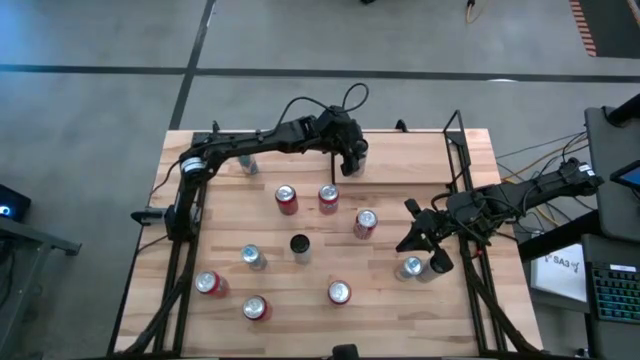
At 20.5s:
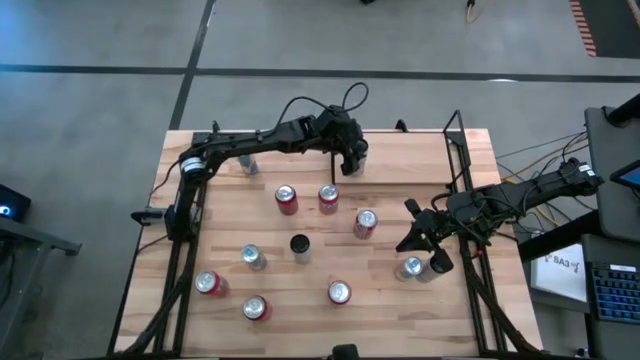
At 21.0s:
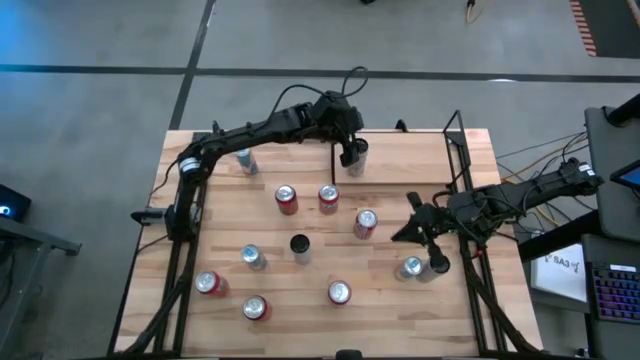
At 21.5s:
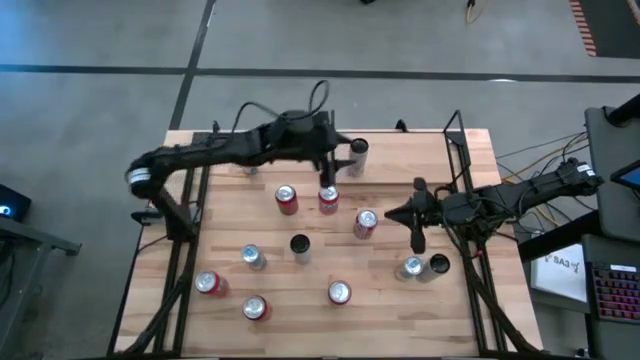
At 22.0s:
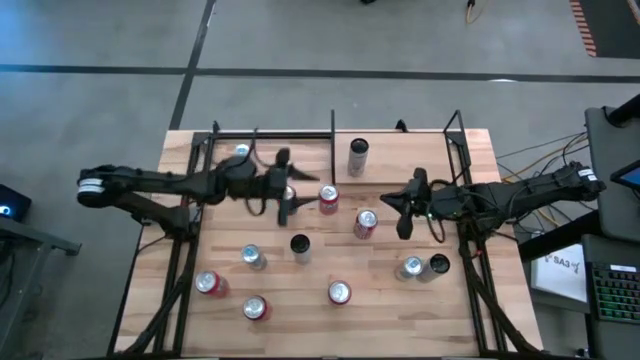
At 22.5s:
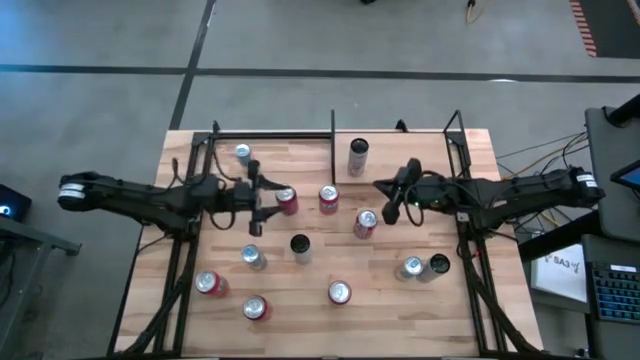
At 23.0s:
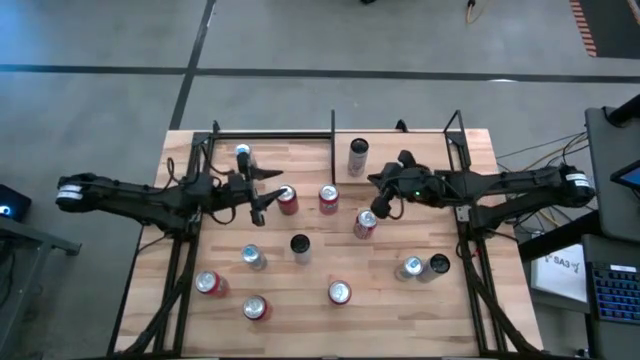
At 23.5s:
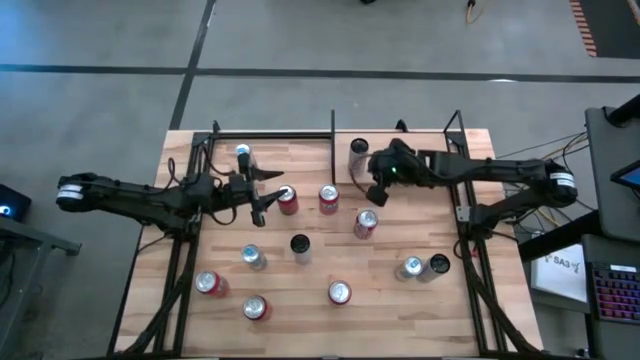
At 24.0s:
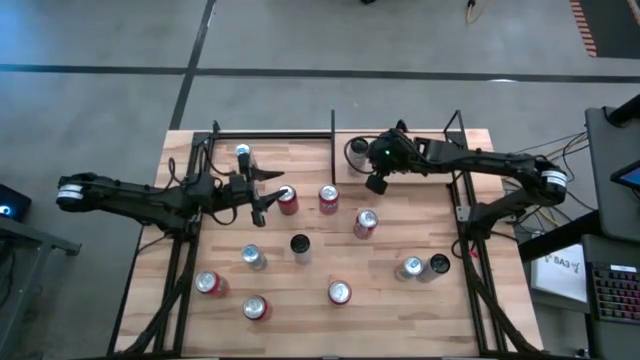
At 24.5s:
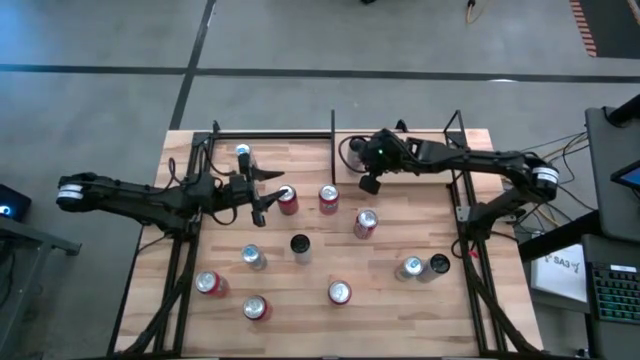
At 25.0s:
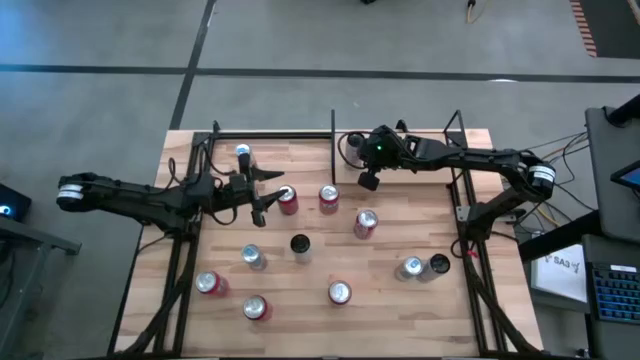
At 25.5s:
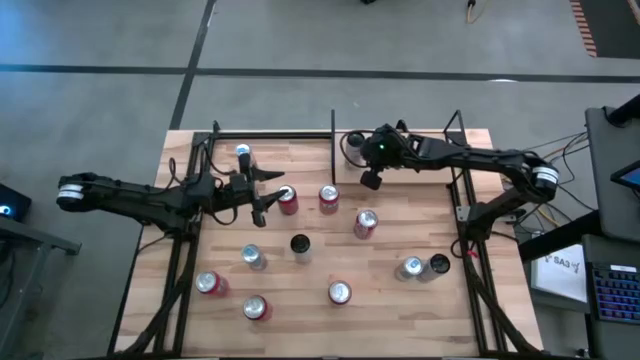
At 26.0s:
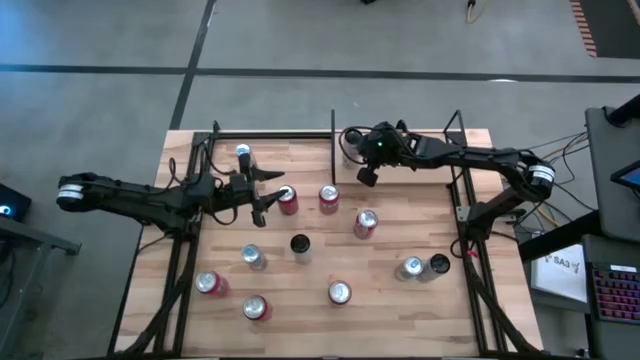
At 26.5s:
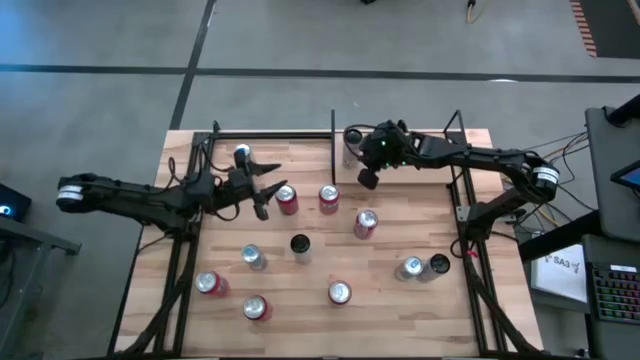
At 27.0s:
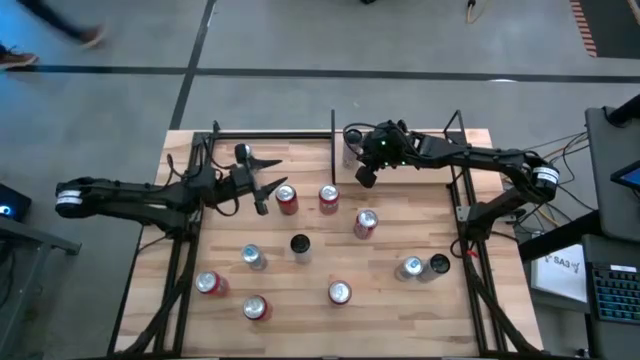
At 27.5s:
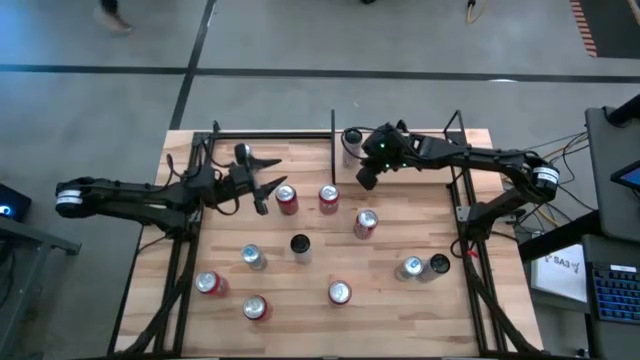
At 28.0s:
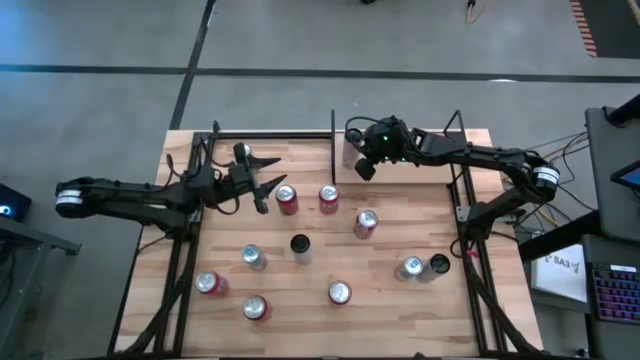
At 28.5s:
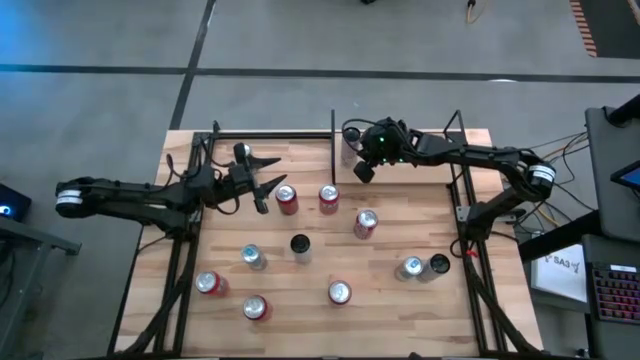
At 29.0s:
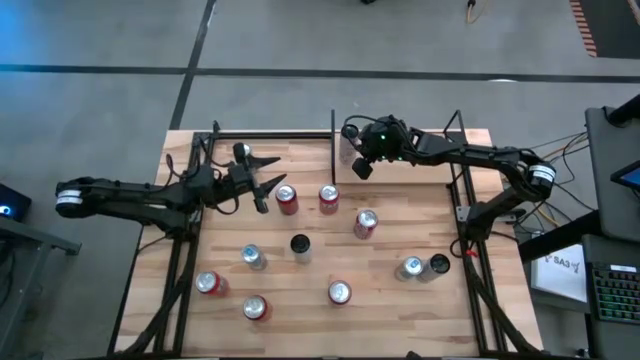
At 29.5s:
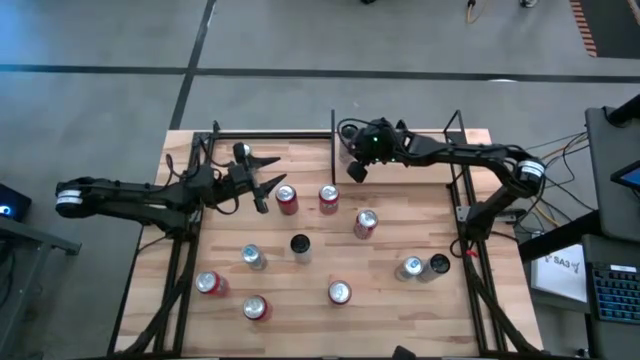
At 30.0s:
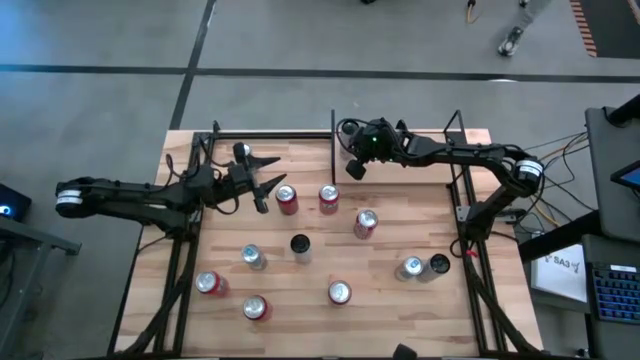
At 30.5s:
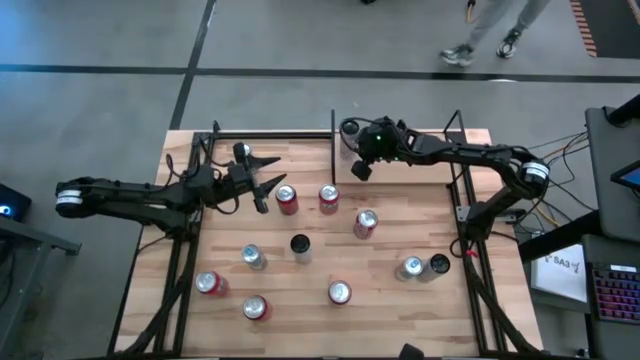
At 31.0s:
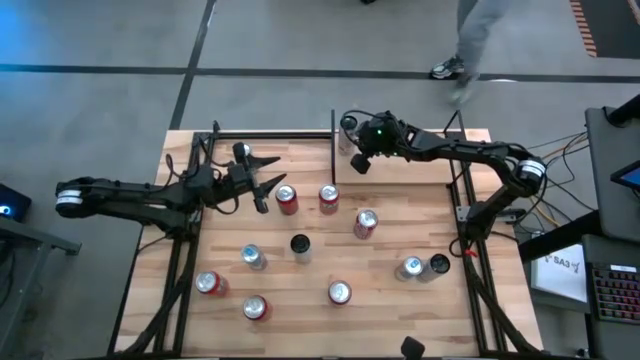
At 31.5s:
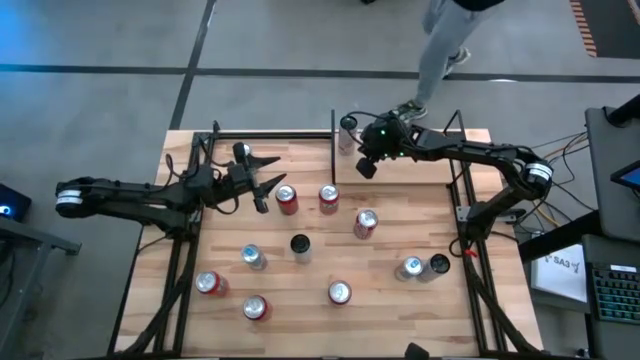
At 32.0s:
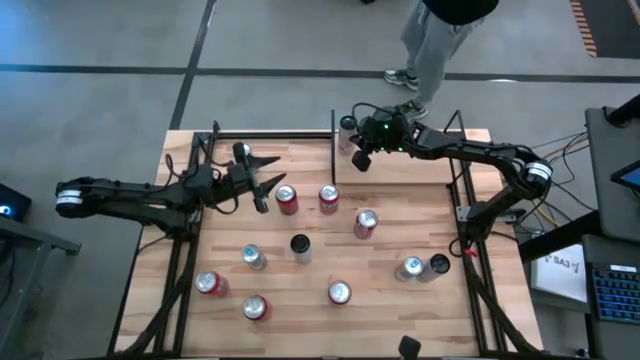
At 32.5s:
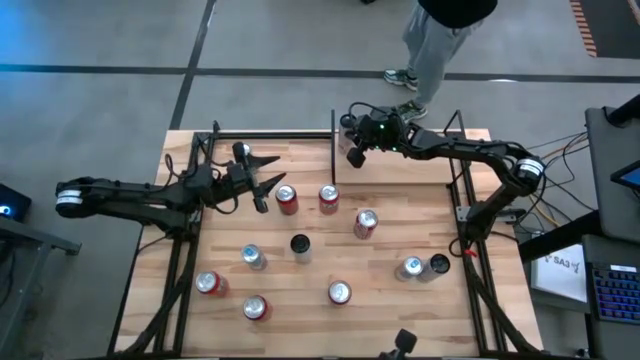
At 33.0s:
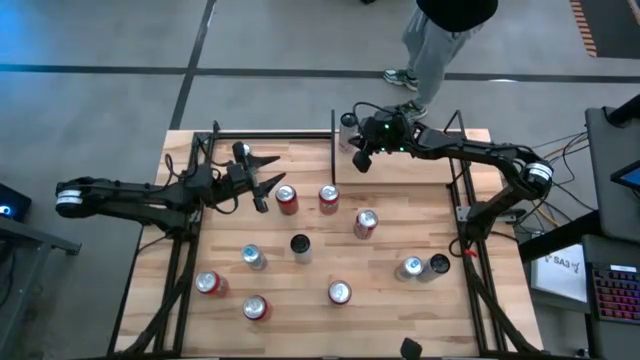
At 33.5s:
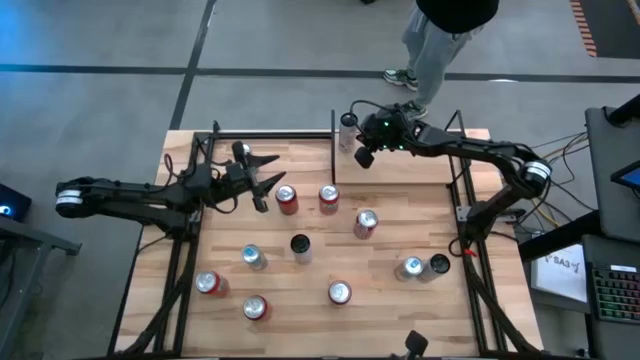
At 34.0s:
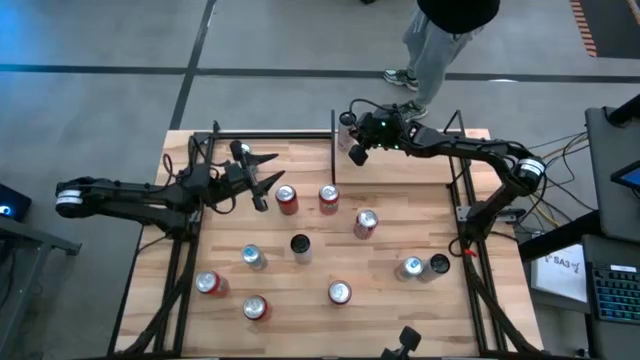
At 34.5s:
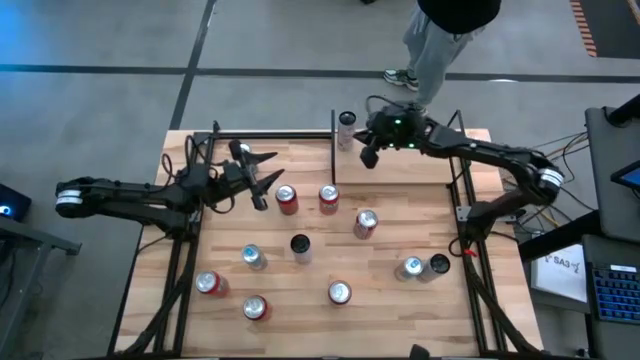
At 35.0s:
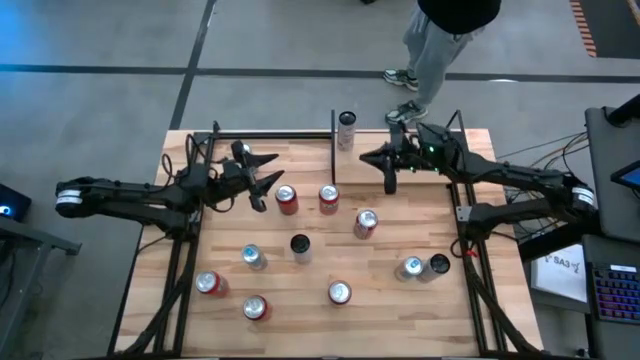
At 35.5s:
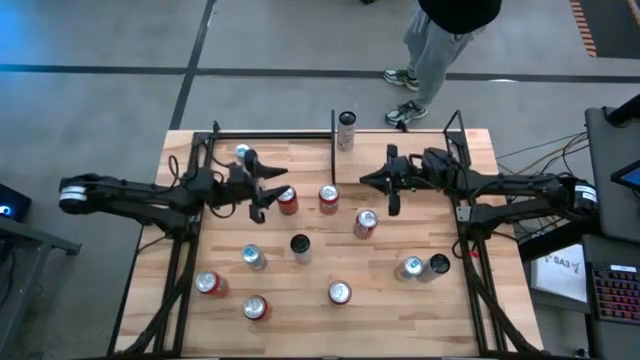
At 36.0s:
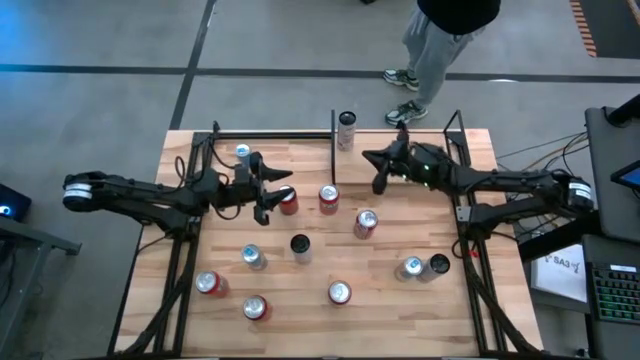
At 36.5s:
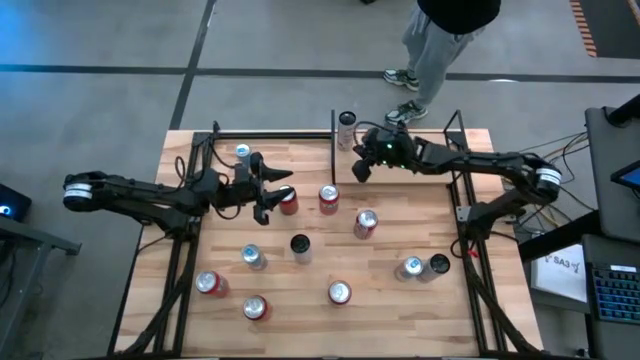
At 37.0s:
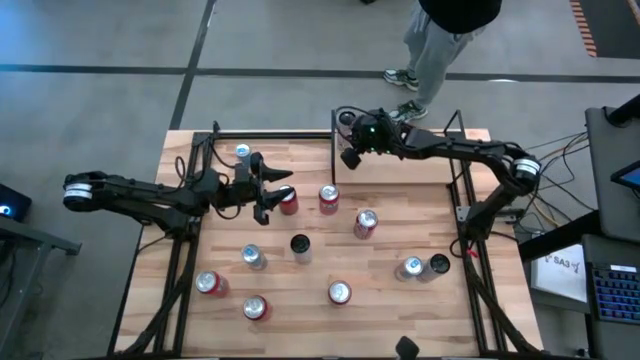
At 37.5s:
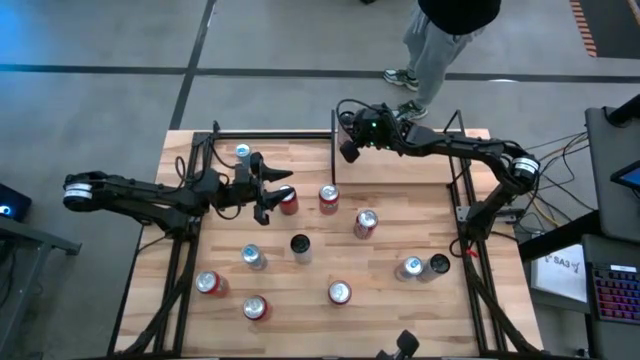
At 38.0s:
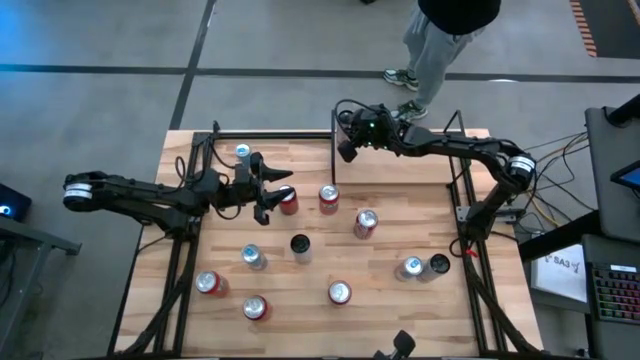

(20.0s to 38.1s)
Task: Place canned beverage on shelf
Put the top white soda can on the shelf

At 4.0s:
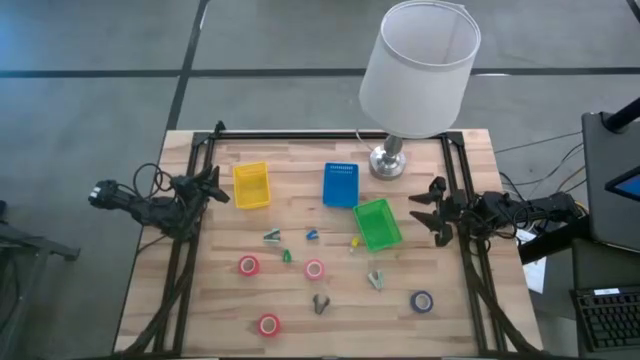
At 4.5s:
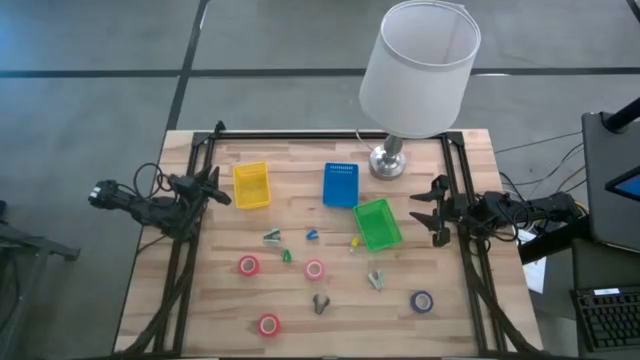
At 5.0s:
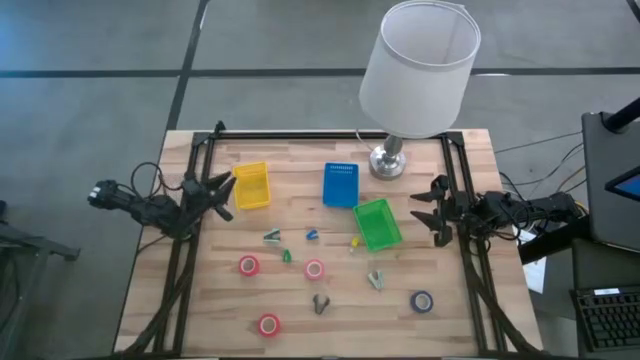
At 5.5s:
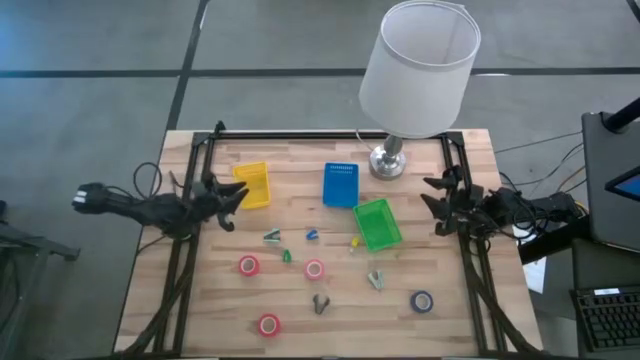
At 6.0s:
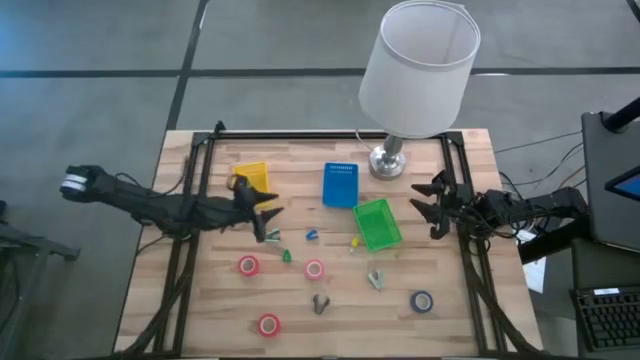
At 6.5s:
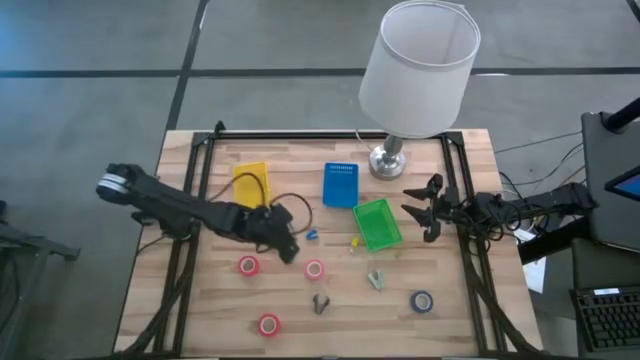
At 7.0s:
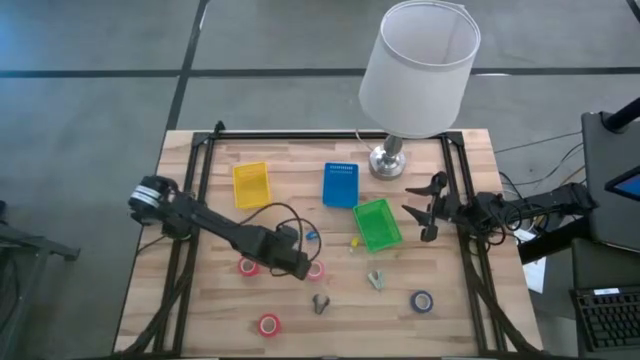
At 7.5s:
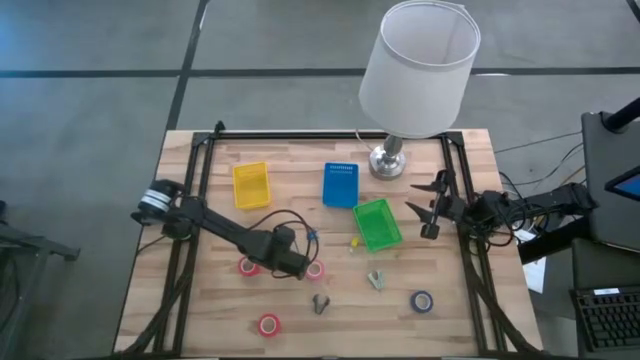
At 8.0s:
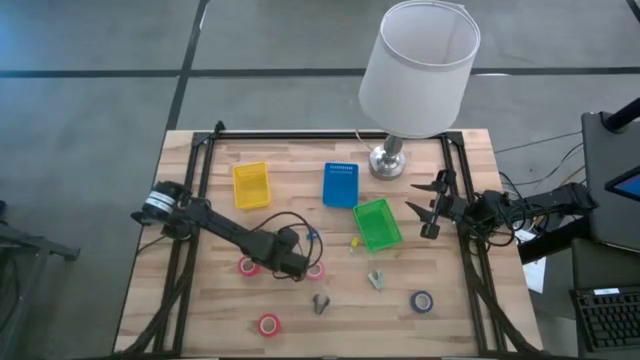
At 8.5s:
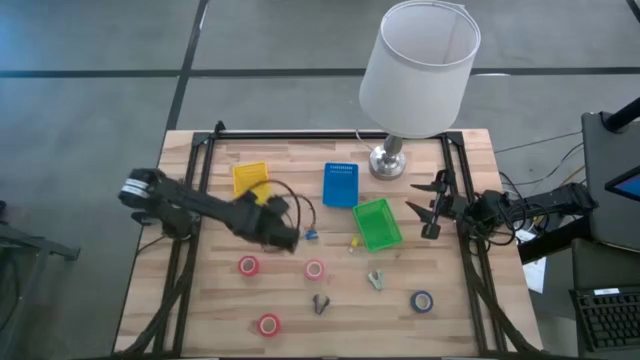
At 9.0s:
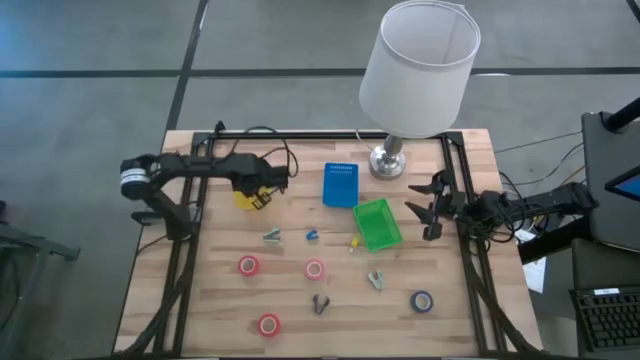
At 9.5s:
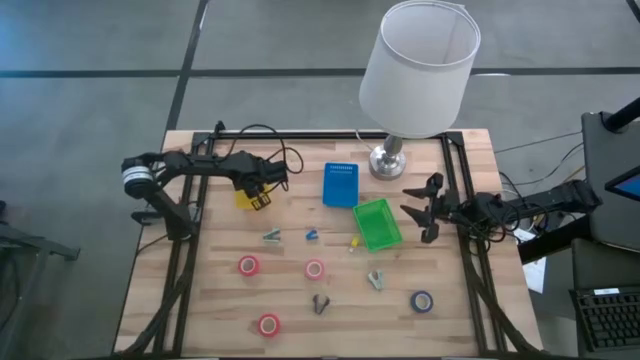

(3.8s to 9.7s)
Task: Pick and place Stapler, Stapler remover, tape
Put the green stapler into the yellow basket
